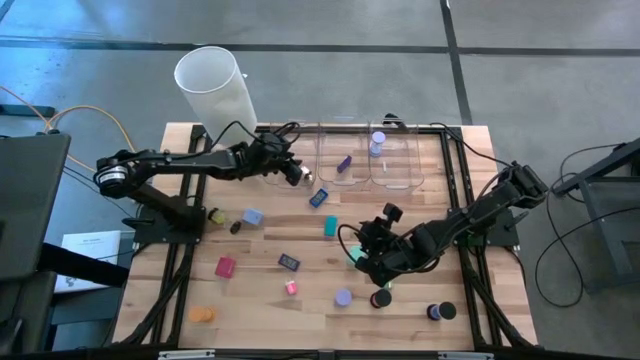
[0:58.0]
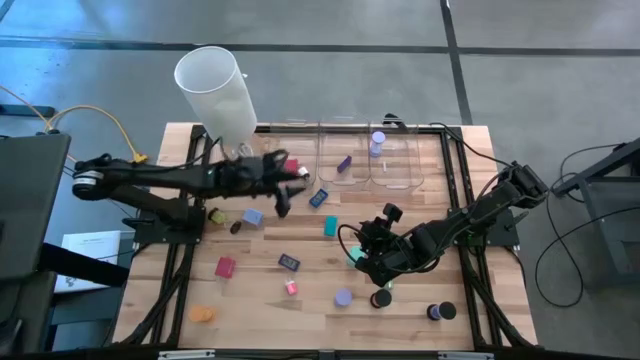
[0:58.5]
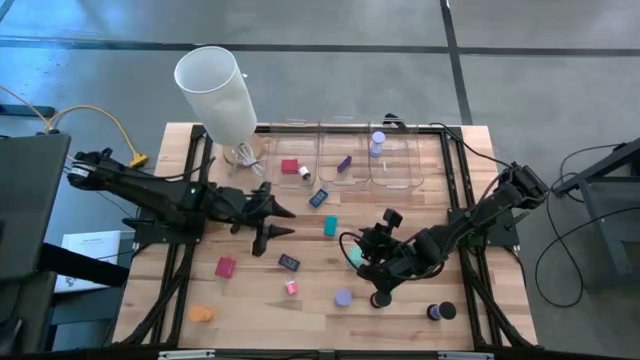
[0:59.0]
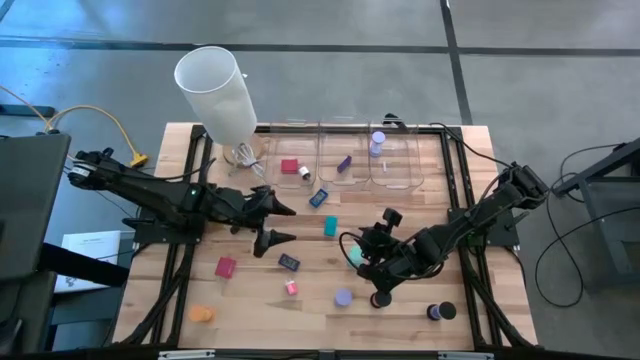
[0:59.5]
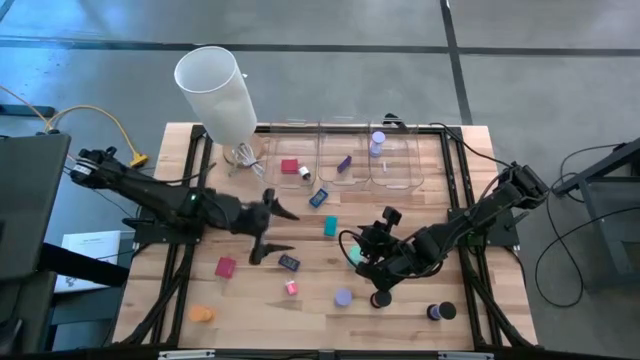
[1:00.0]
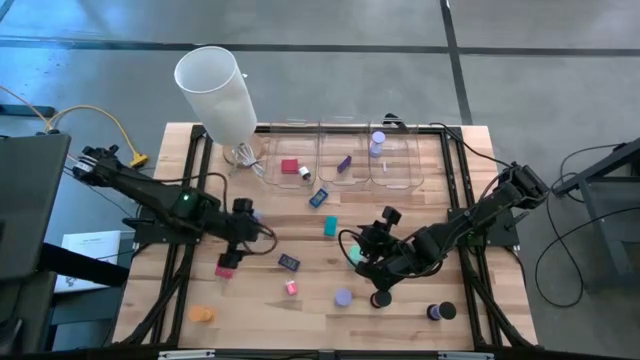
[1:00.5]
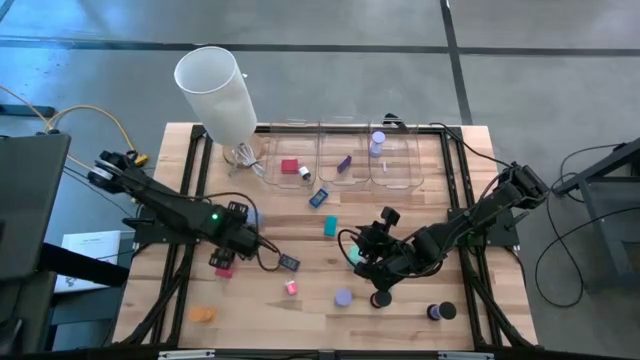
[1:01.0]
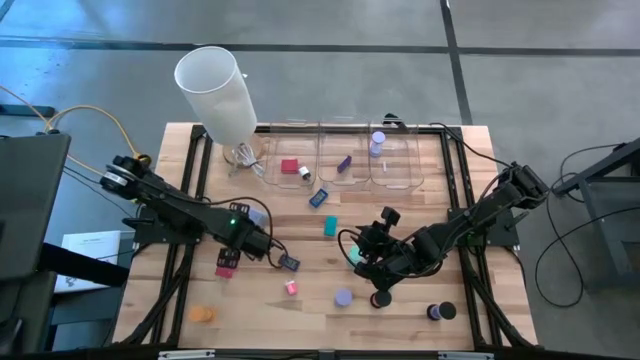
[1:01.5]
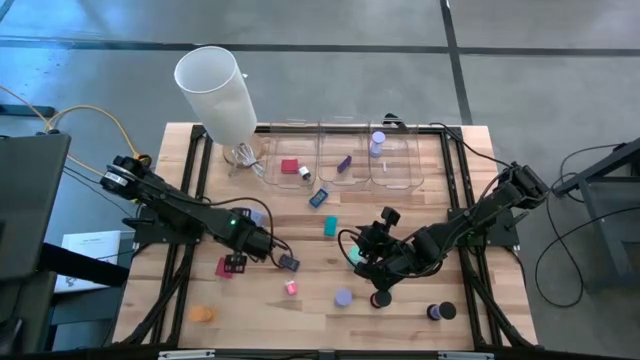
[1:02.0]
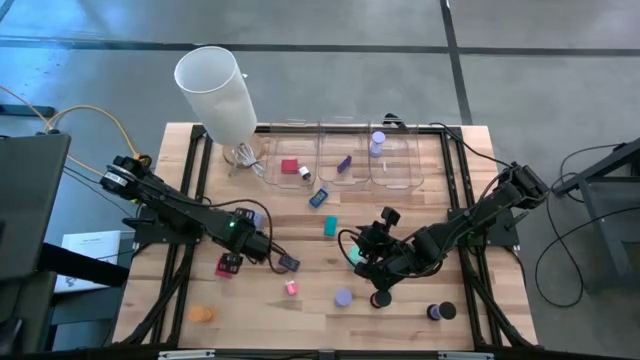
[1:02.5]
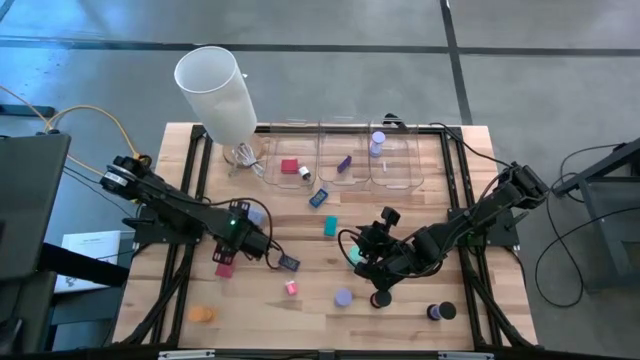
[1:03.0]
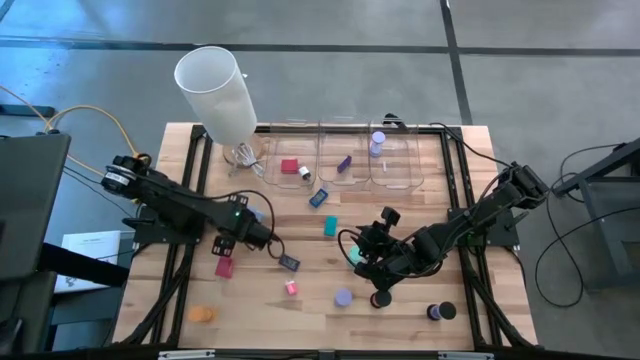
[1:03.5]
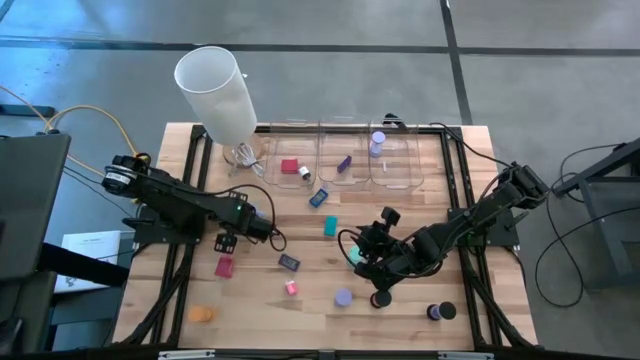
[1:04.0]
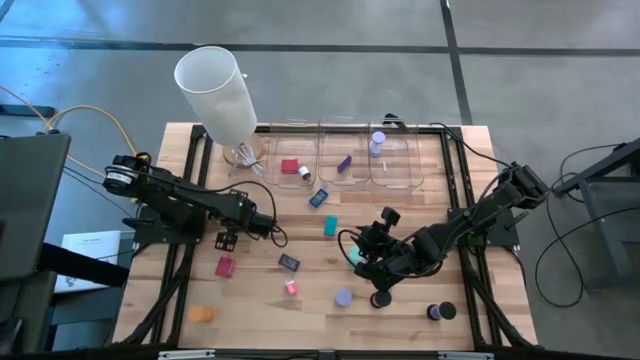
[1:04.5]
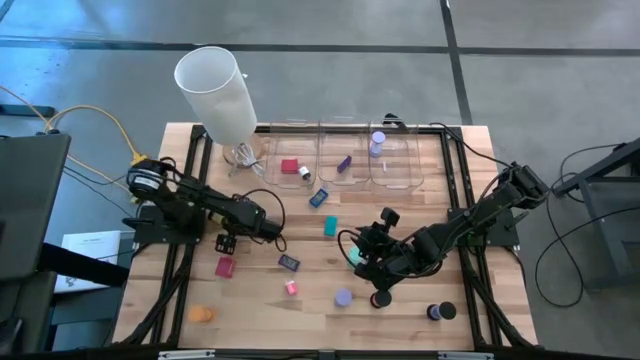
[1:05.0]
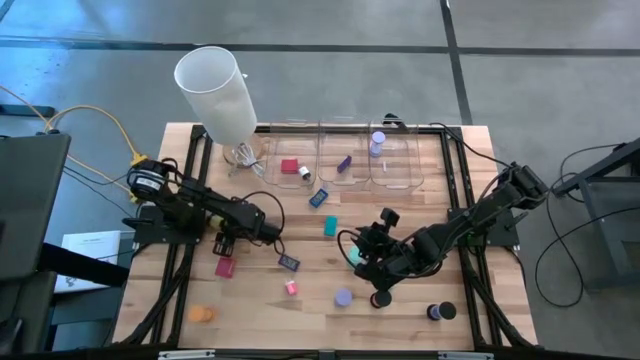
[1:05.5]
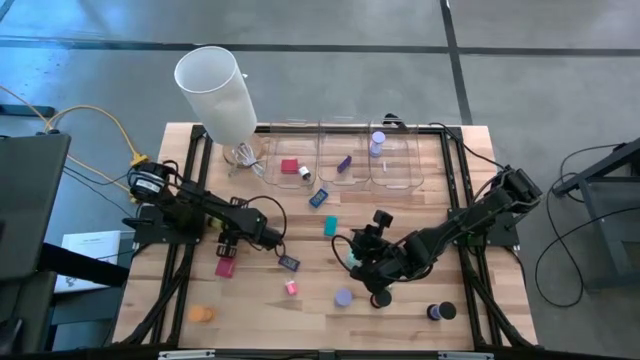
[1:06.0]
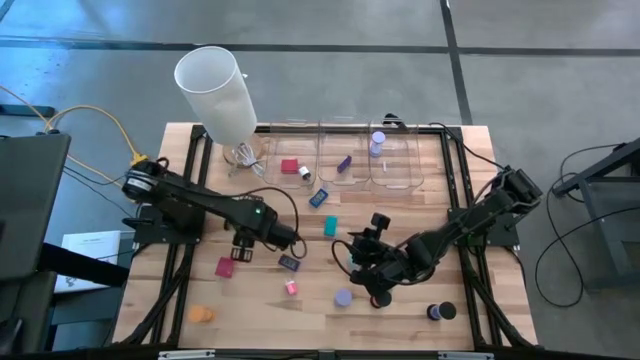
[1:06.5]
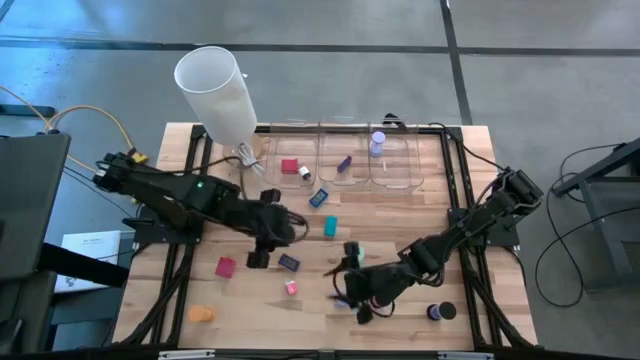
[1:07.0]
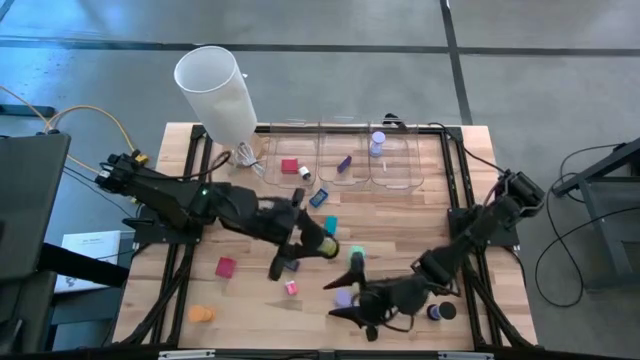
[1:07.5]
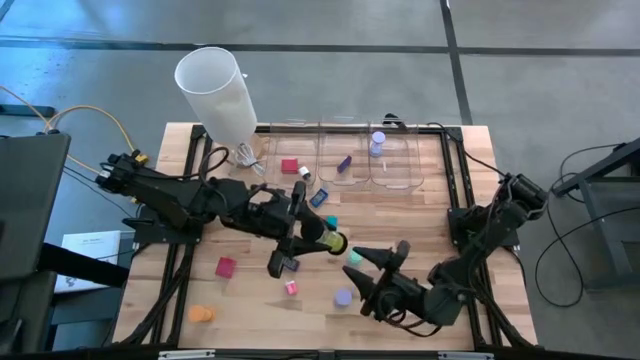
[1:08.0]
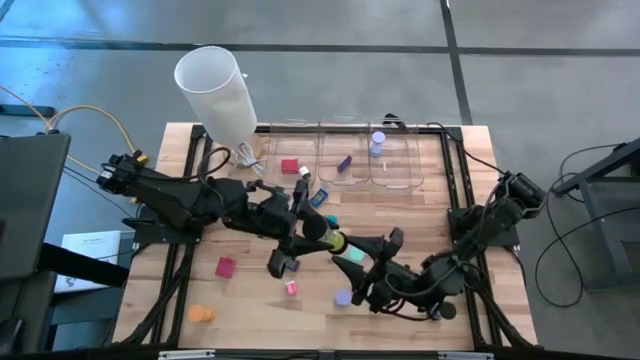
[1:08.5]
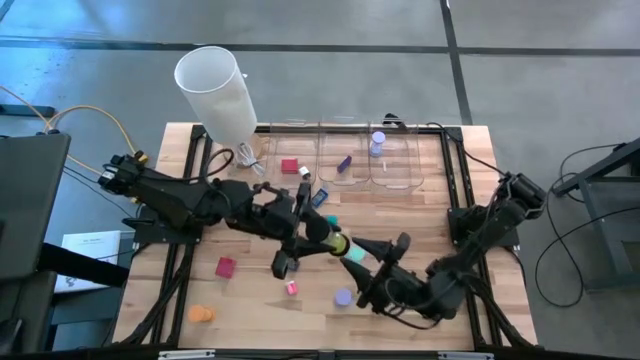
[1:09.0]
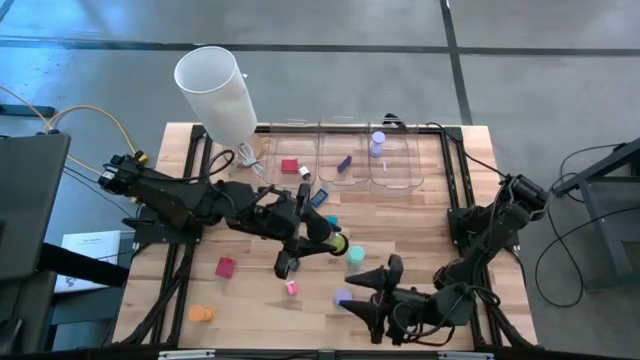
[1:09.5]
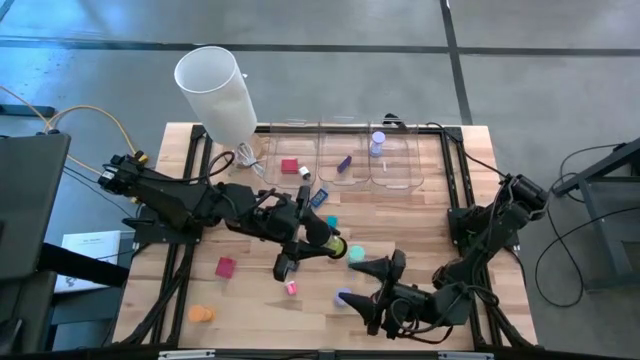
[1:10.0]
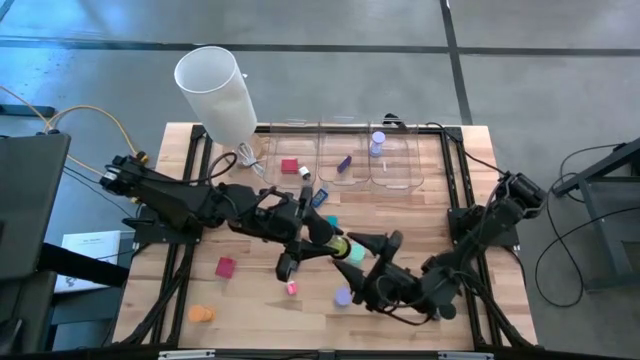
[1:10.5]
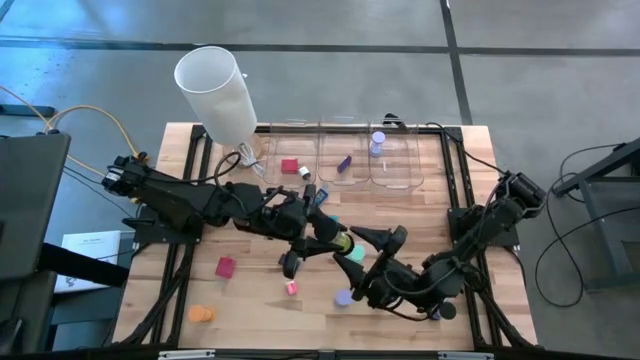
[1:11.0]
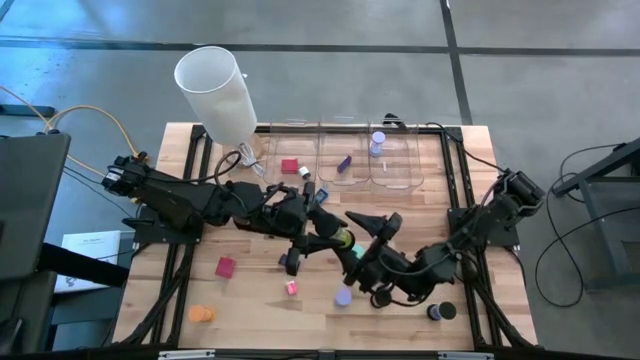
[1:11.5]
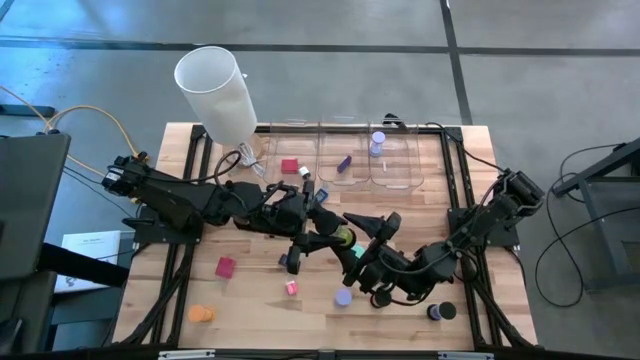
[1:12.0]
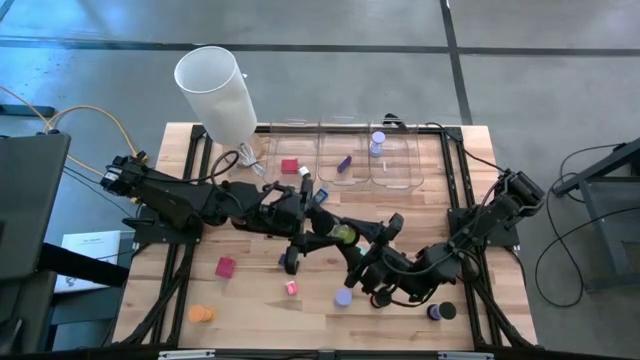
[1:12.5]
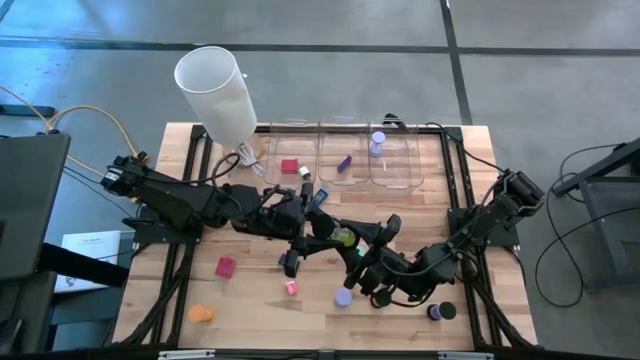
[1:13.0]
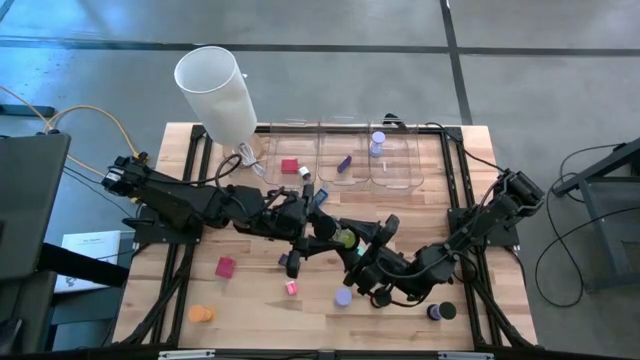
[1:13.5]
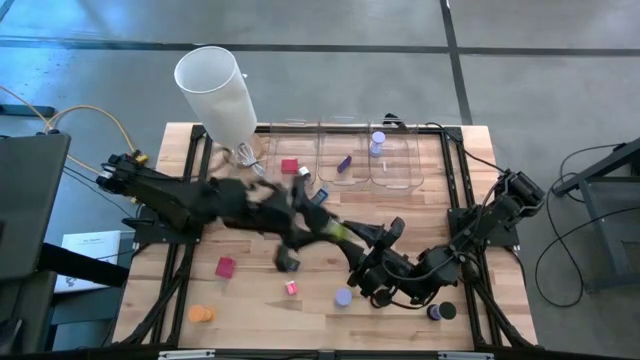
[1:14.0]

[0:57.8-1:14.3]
Task: Pick & Place Office items
Put the light green hourglass into the right transparent bin

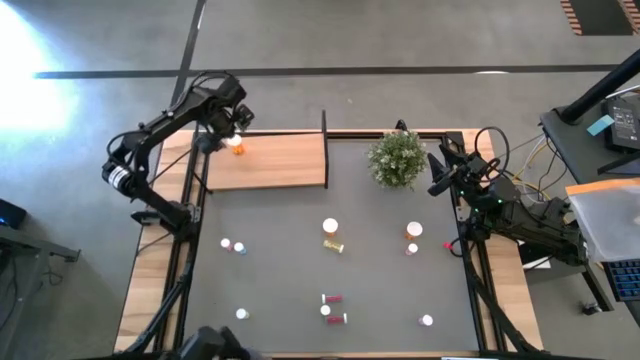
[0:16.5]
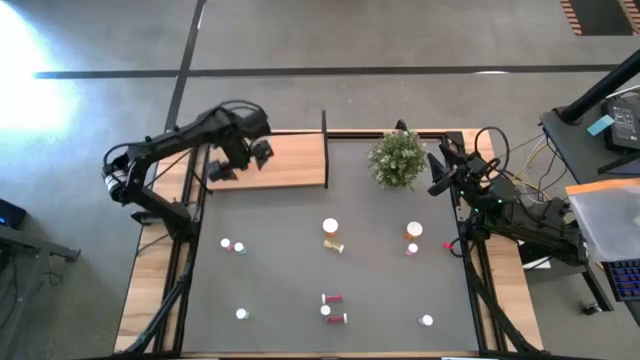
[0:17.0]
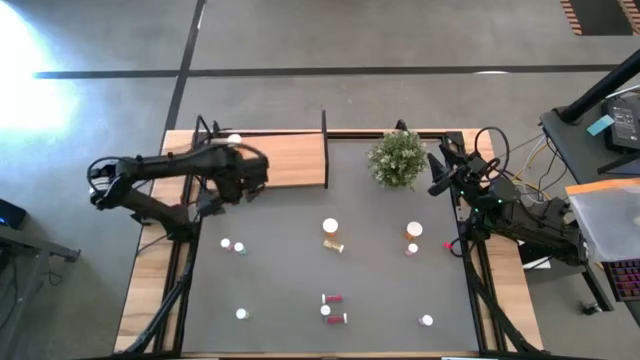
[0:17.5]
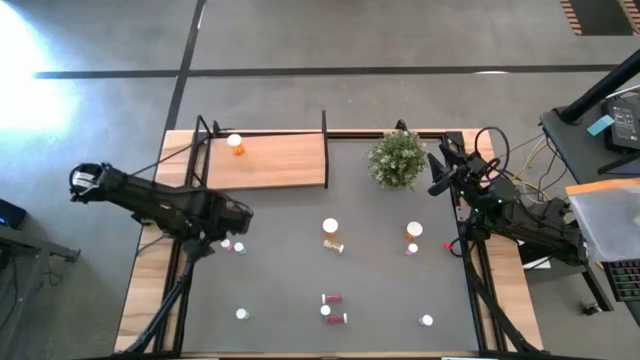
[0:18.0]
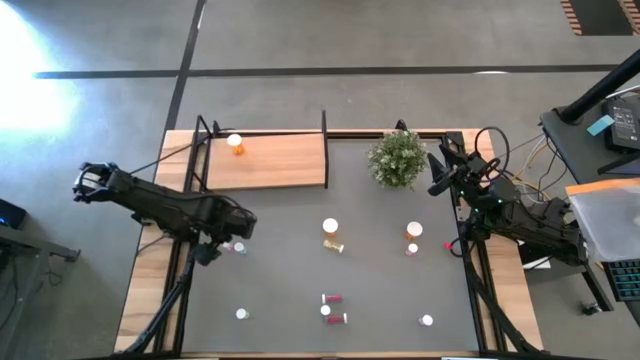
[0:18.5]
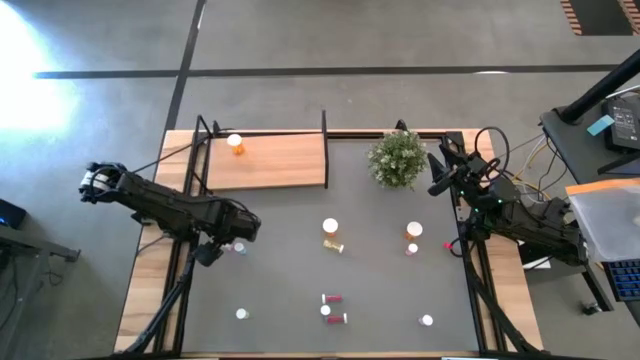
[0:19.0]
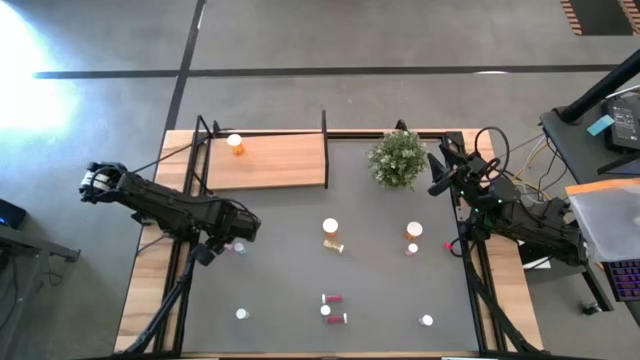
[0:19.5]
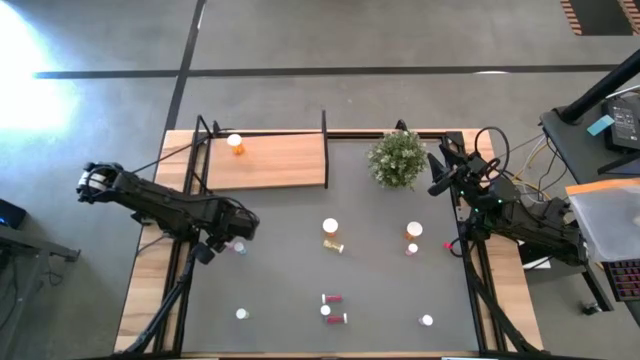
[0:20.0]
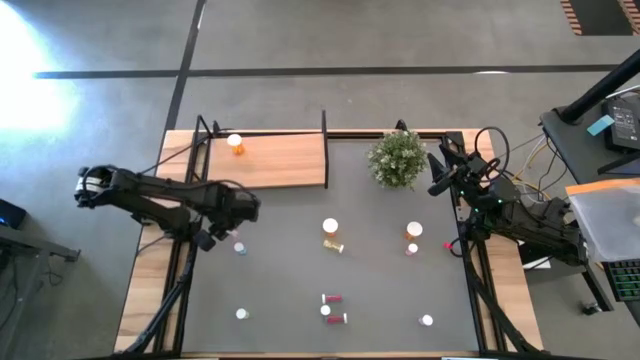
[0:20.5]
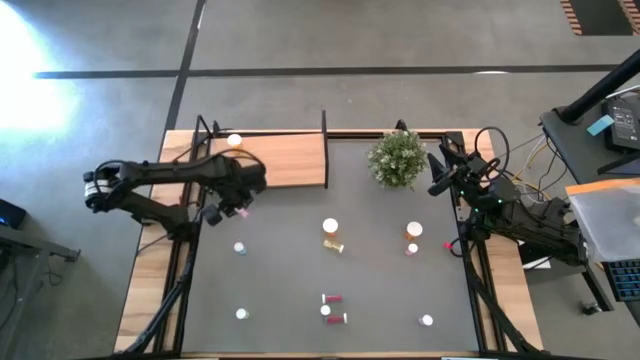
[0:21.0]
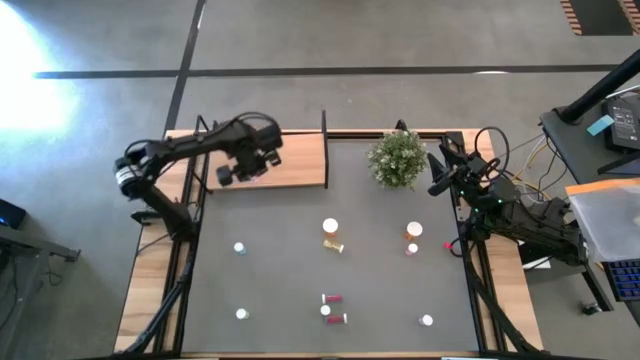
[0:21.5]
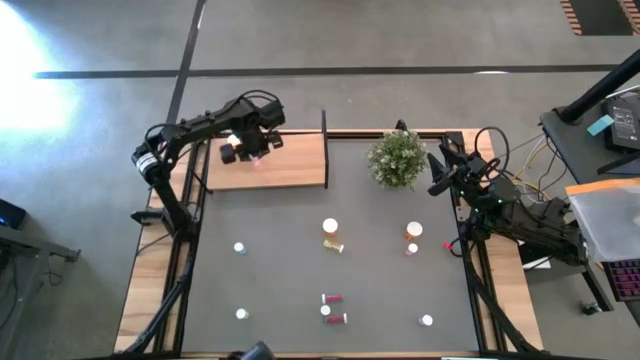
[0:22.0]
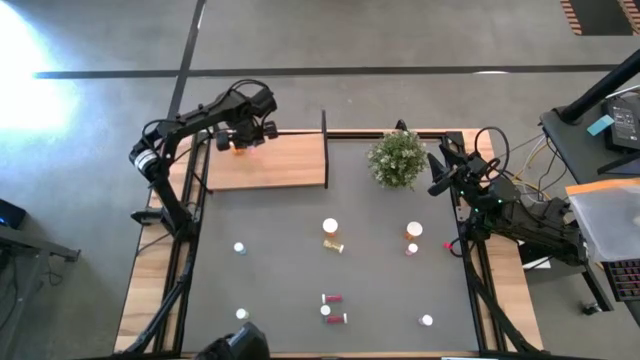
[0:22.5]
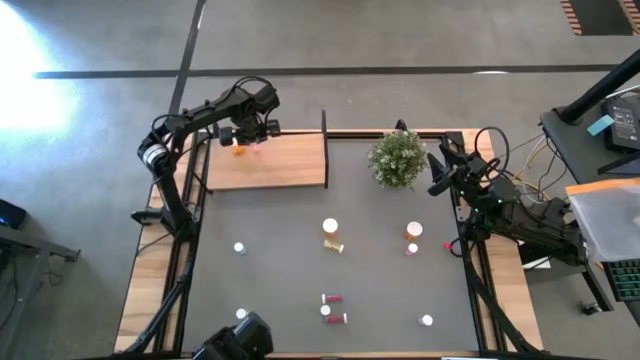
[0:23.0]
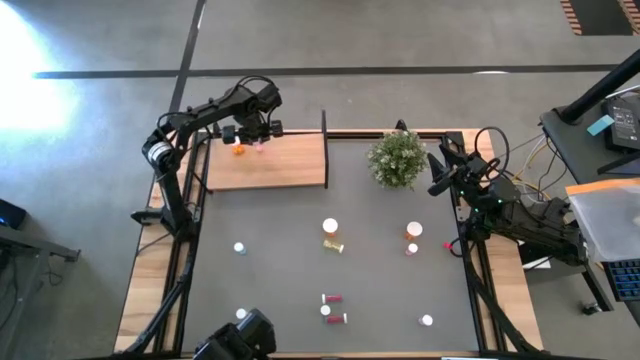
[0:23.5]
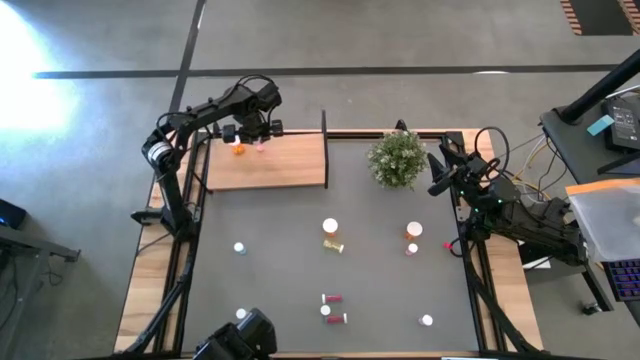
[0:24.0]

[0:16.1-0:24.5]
Task: Pick and place medicine bottles onto shelf by color
Put the top left small pink pill bottle on the shelf
